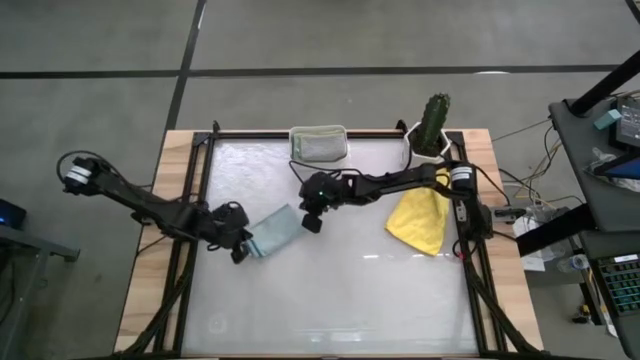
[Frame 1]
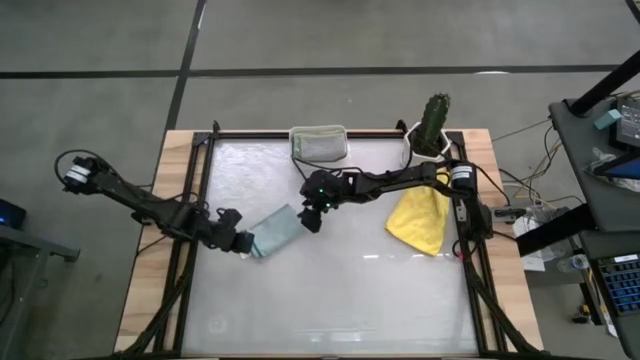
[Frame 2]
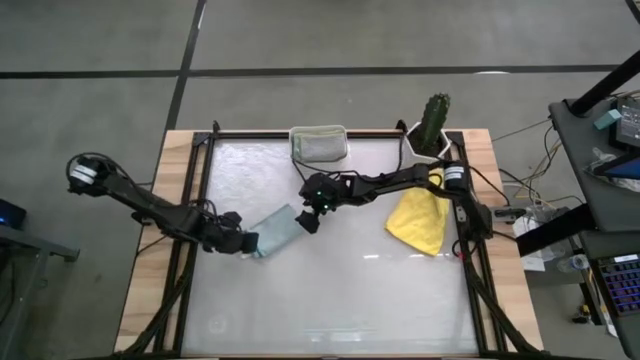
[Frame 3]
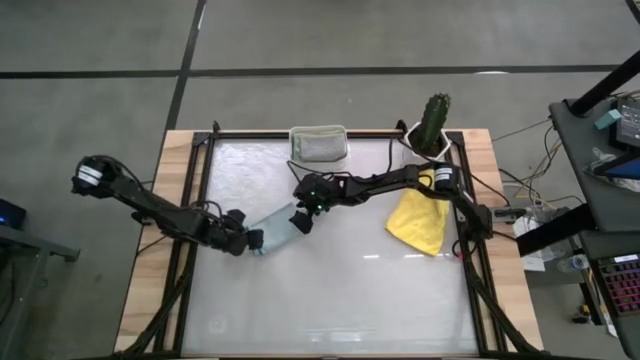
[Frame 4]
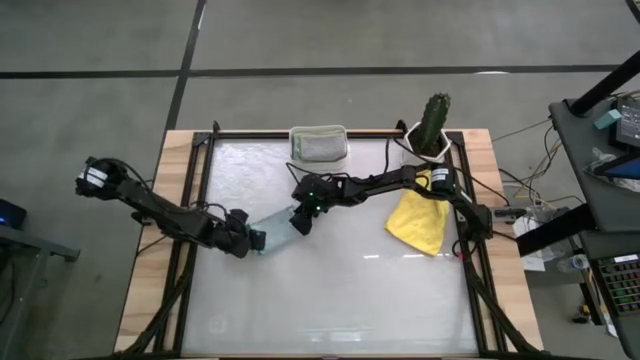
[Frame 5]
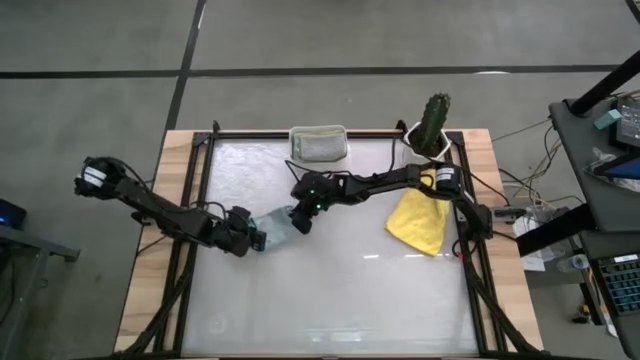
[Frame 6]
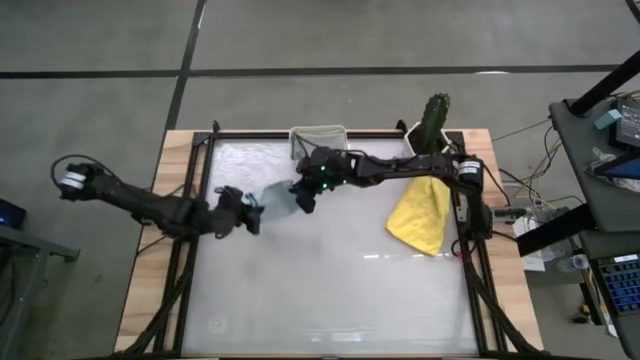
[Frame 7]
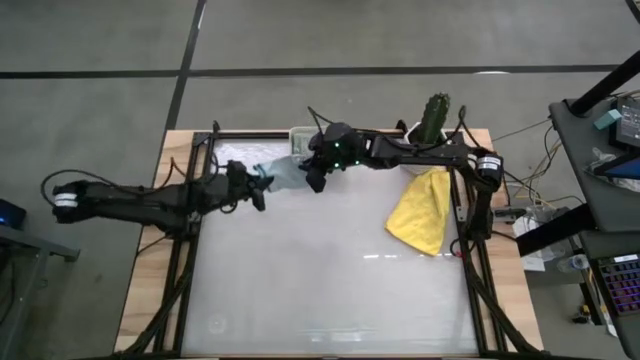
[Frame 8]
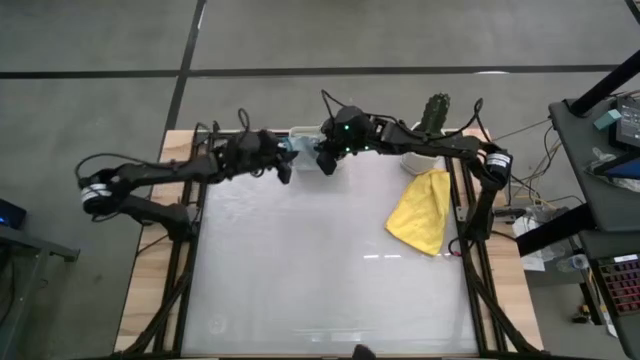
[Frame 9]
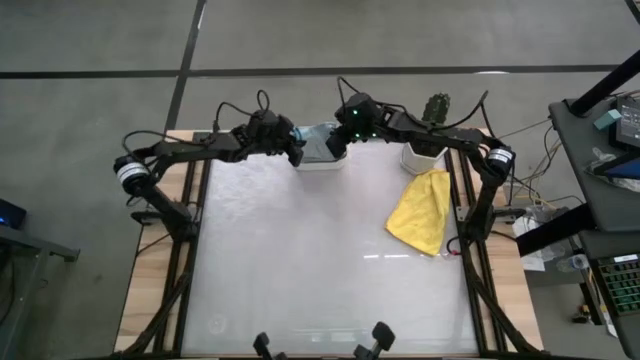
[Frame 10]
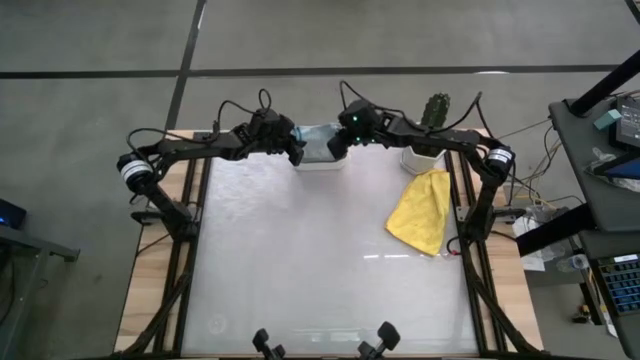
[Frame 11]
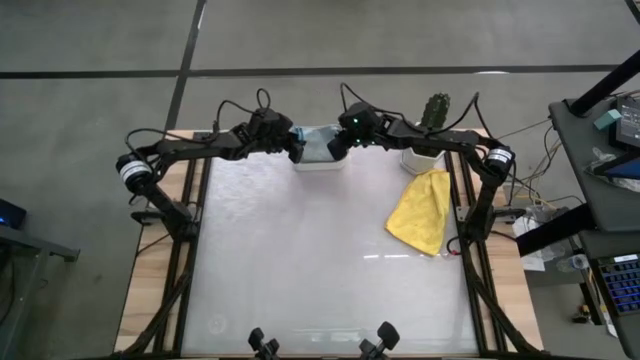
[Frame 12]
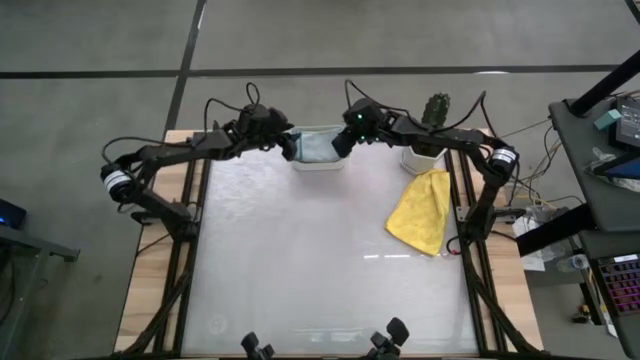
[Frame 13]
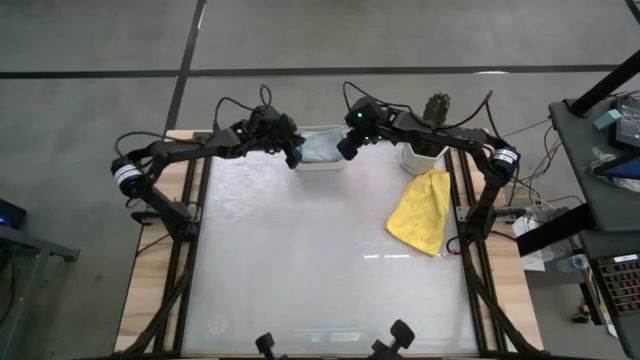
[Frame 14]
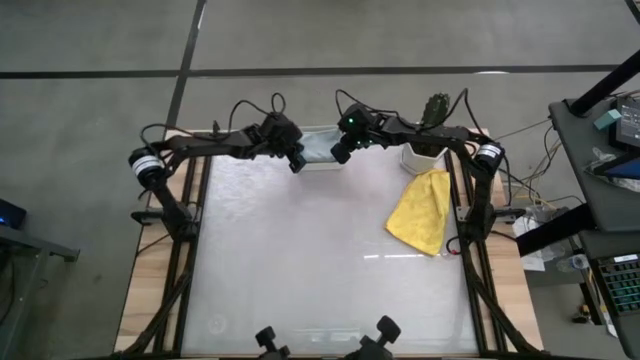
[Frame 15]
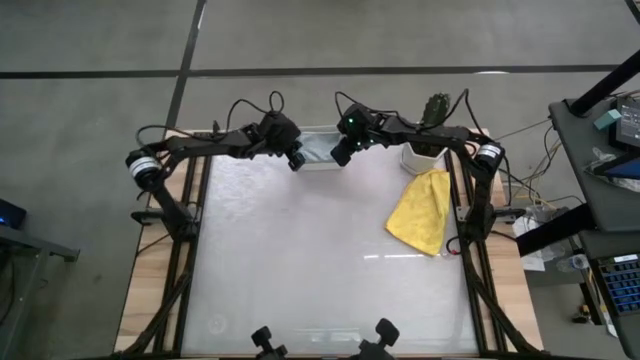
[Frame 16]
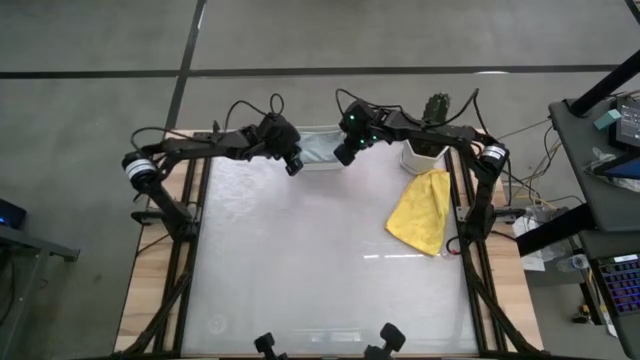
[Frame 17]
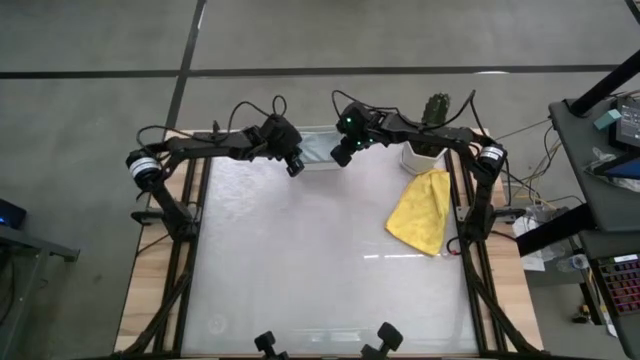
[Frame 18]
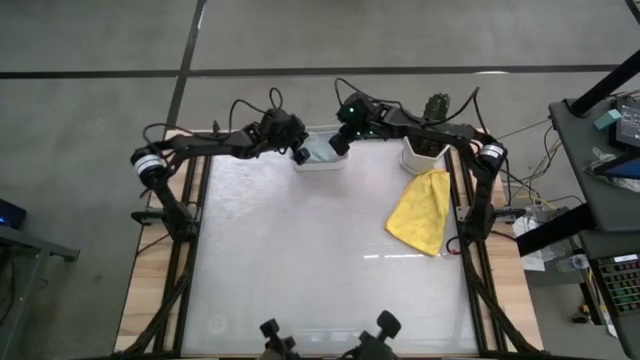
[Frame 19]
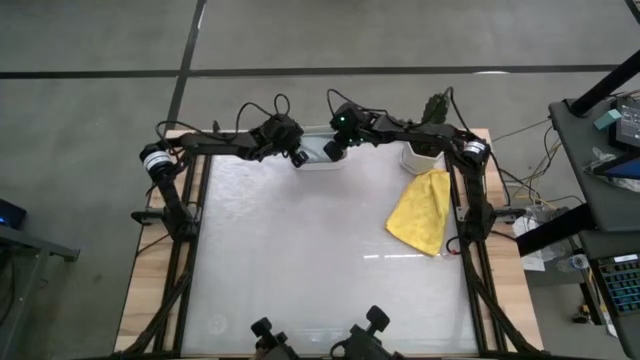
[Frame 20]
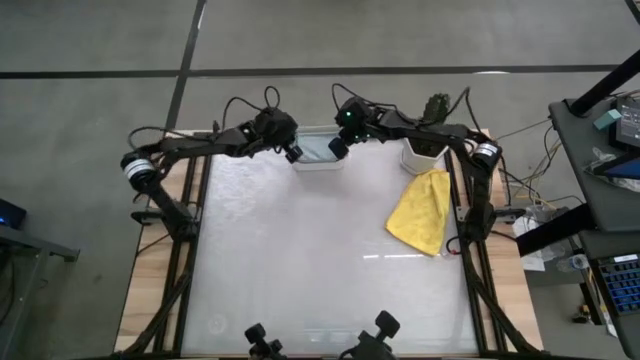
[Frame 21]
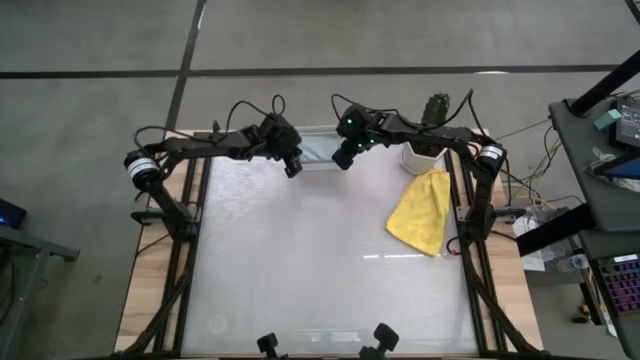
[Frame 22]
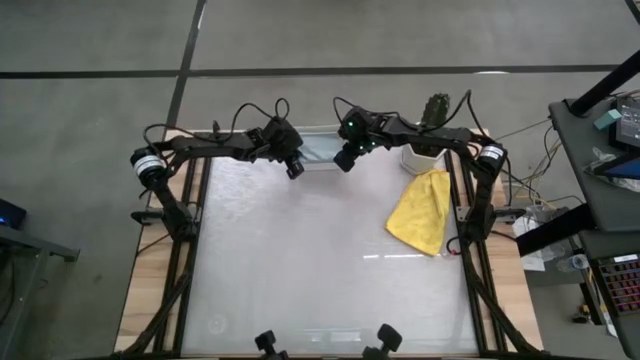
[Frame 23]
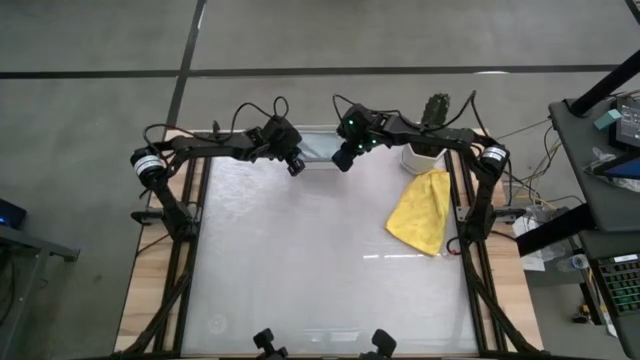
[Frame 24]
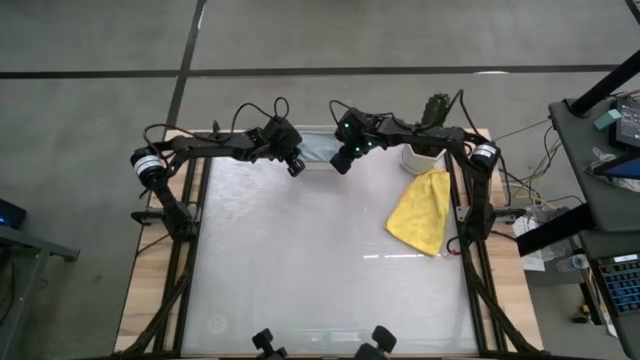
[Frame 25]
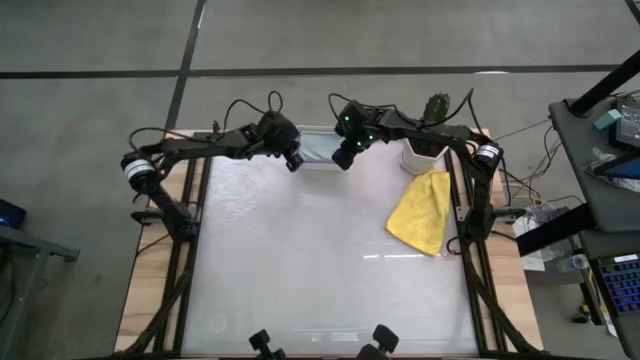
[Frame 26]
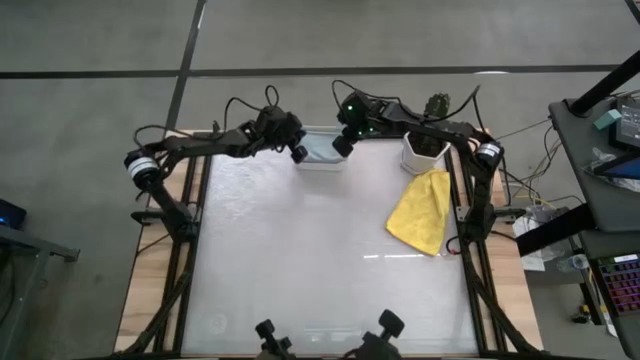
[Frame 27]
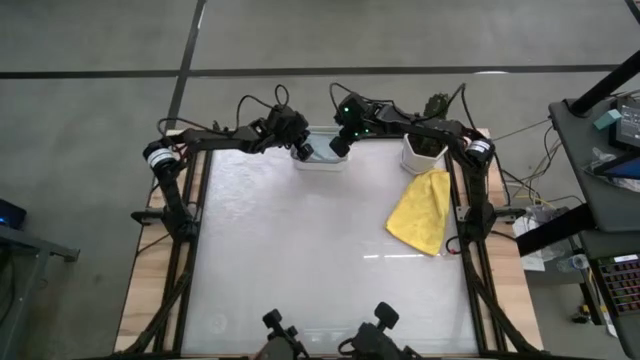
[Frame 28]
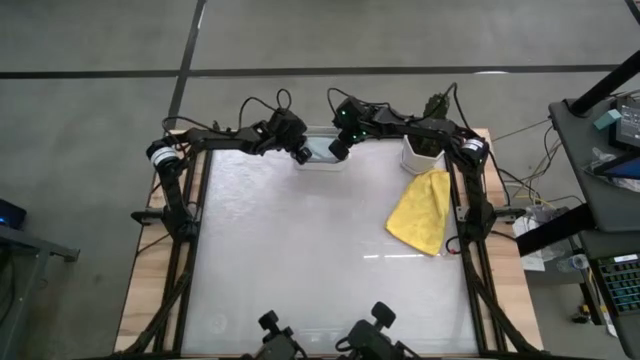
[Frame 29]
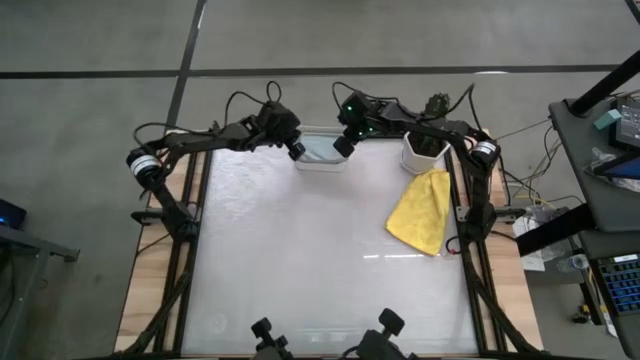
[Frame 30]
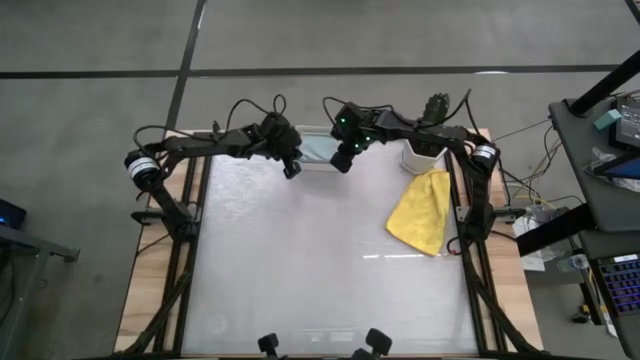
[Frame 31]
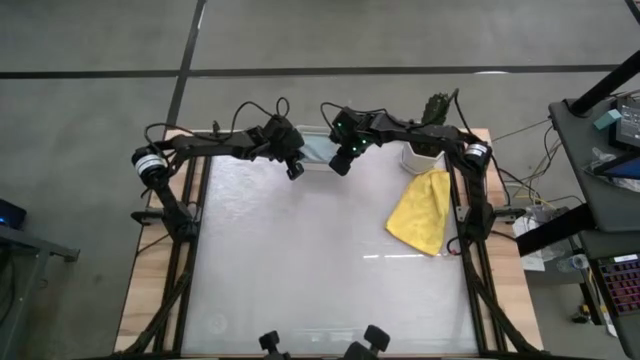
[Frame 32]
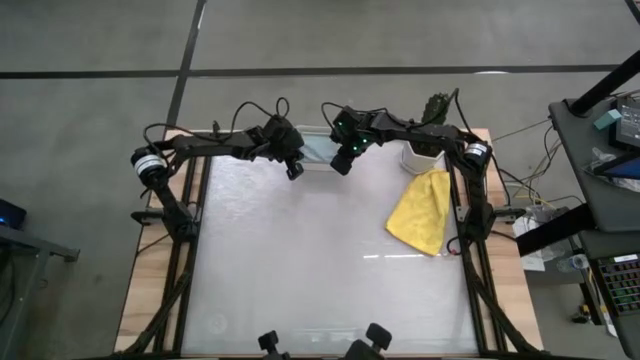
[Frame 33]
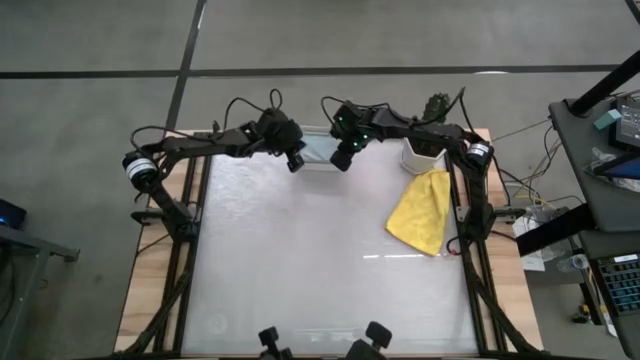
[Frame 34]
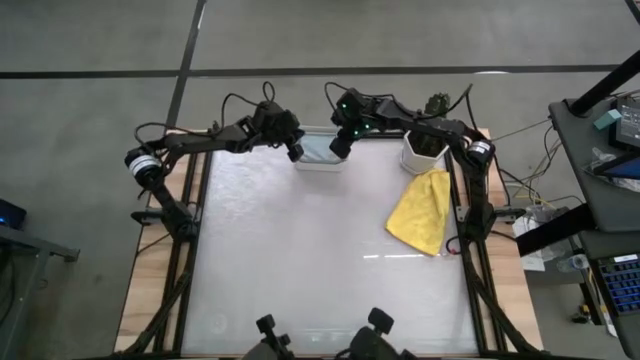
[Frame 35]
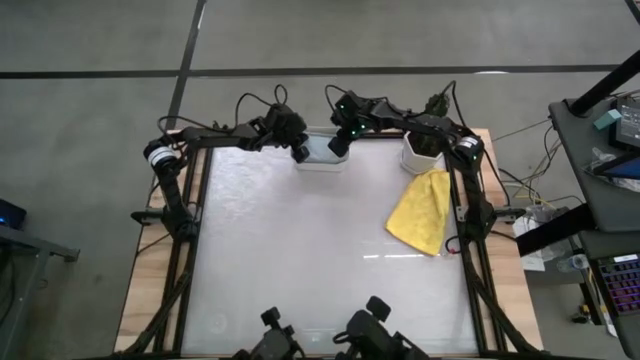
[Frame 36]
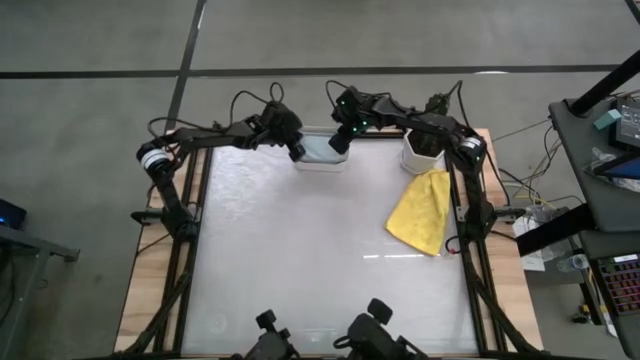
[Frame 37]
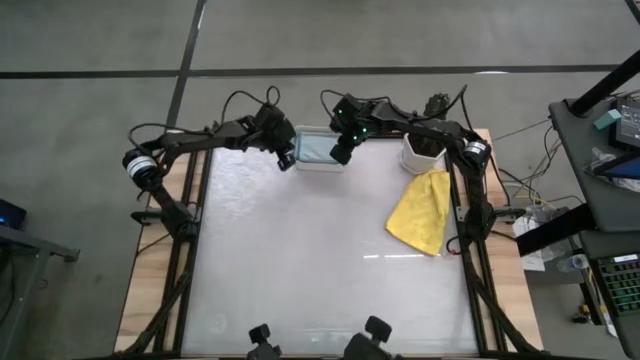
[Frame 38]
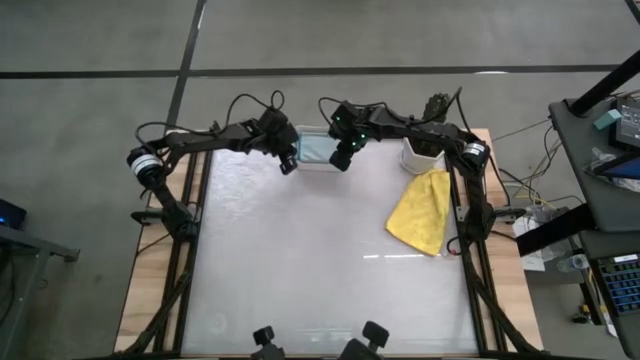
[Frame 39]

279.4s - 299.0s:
Task: Fold microfiber towels
Put the light blue cloth into the bin
